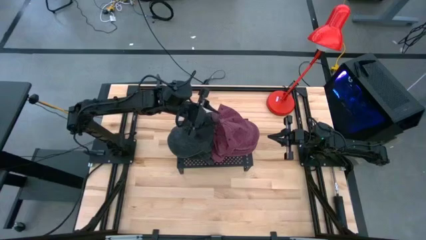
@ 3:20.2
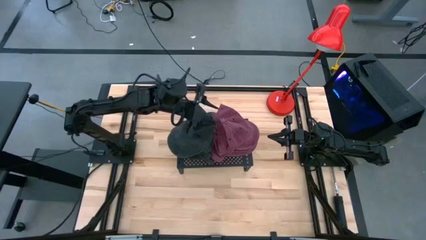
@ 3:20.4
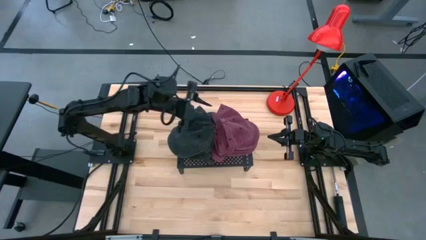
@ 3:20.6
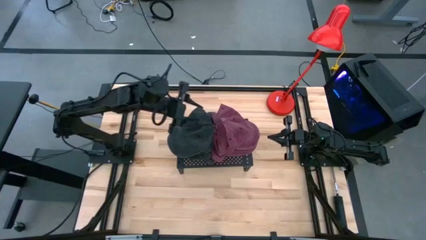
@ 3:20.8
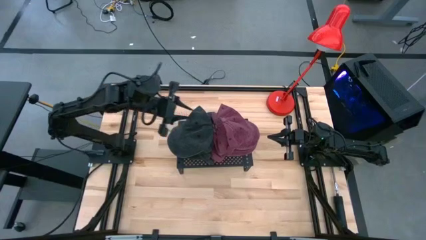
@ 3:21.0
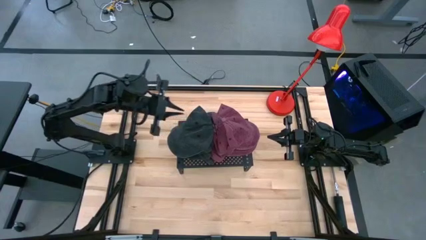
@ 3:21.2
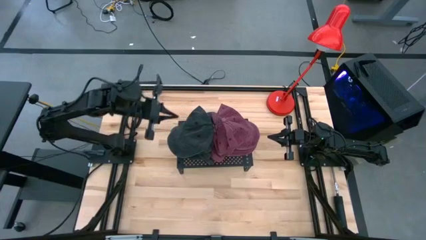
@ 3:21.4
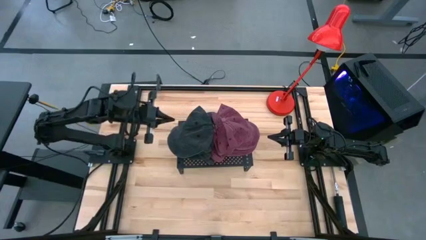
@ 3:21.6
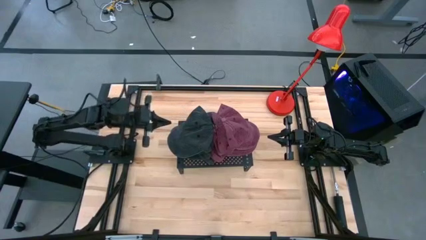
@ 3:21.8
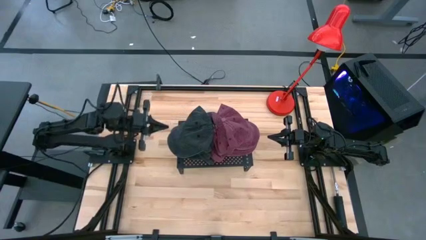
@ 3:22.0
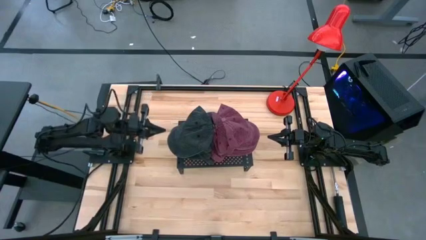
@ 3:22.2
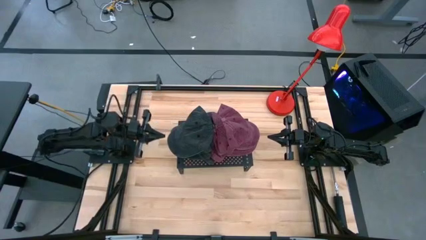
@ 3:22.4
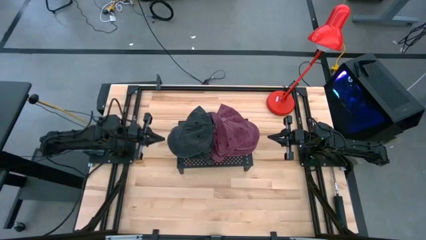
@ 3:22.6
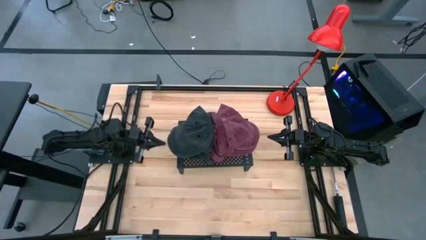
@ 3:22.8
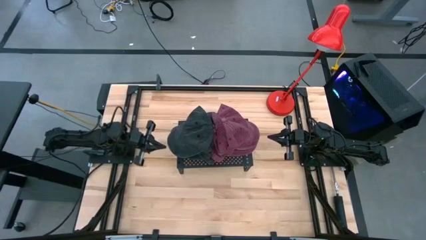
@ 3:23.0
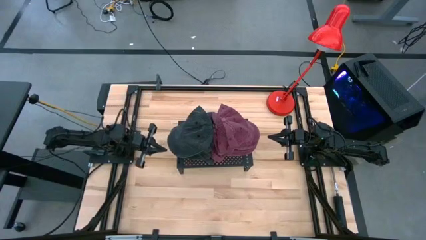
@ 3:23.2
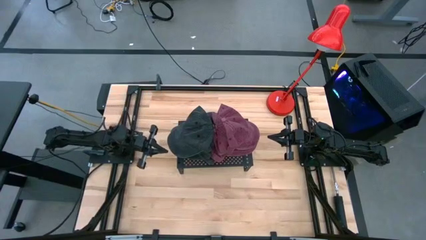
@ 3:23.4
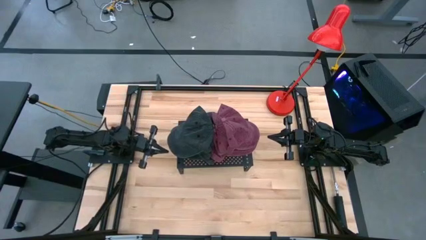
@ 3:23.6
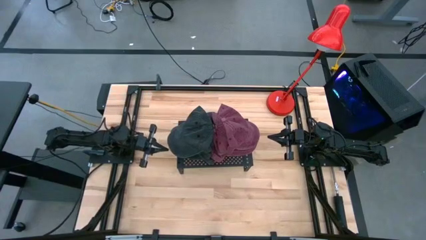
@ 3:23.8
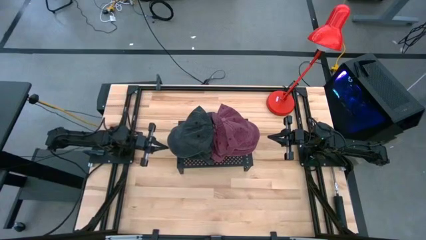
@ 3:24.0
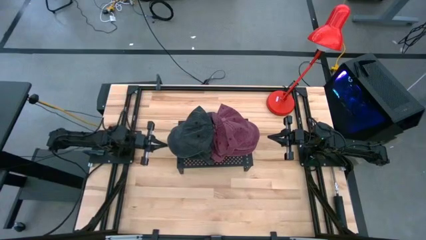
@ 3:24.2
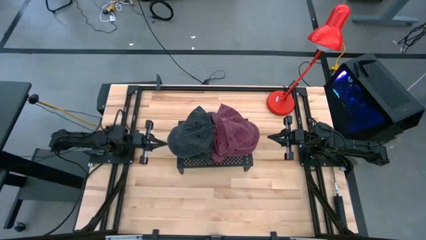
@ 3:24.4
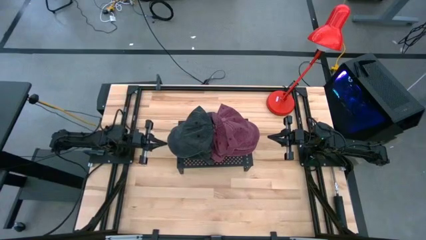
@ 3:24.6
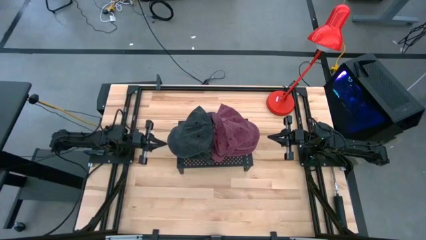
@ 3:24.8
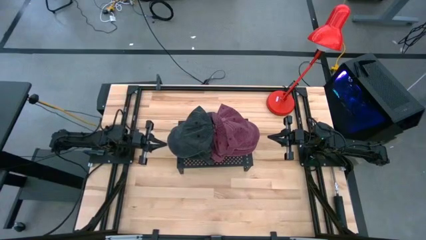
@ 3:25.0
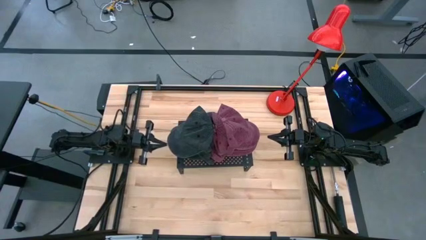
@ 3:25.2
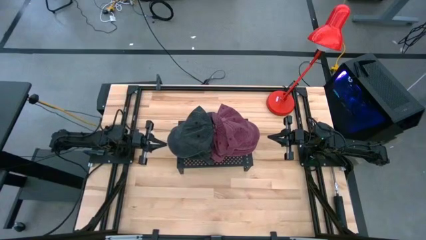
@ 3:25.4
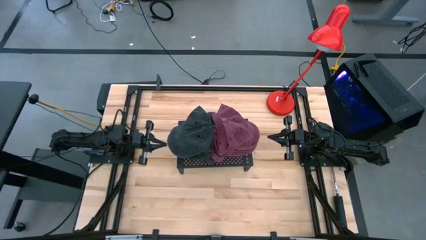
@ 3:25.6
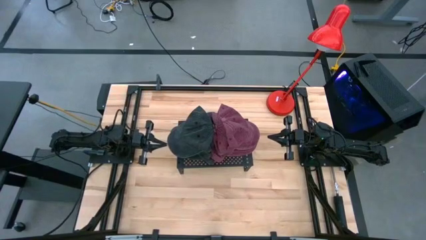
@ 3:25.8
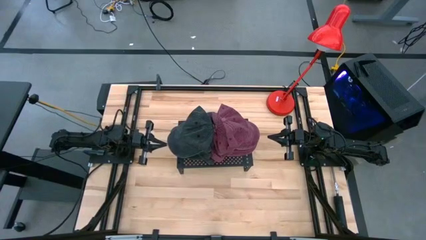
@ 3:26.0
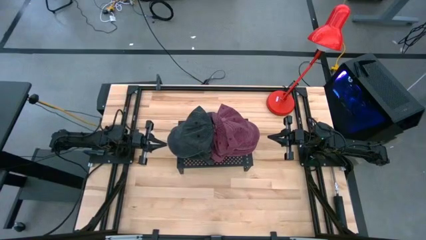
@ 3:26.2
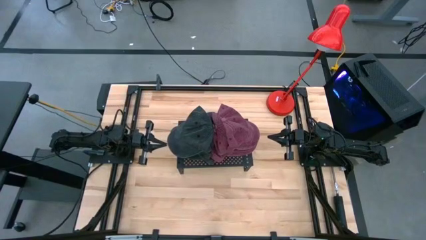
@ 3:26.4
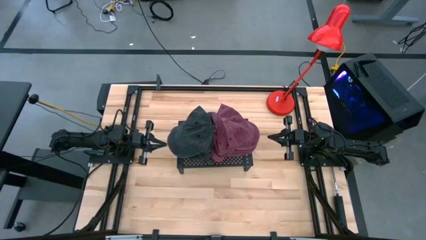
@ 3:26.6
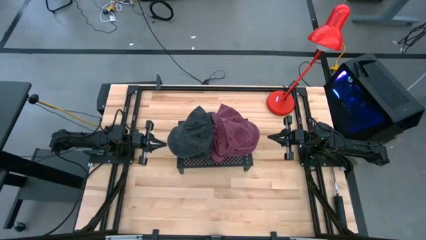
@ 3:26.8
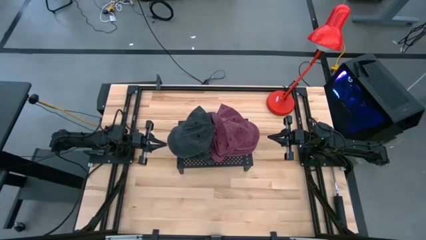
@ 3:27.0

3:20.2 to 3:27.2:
Task: Pick & Place hat
Return to Home Position

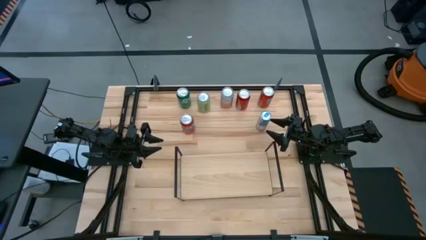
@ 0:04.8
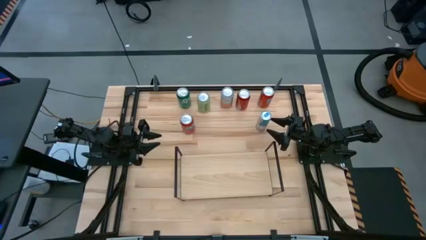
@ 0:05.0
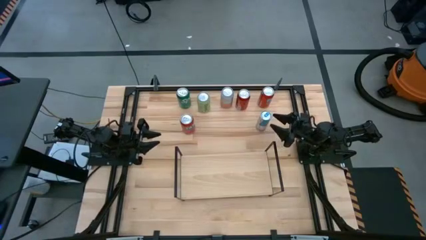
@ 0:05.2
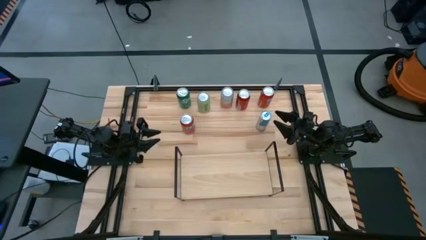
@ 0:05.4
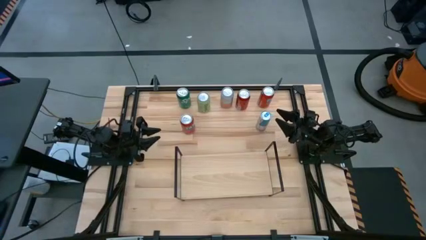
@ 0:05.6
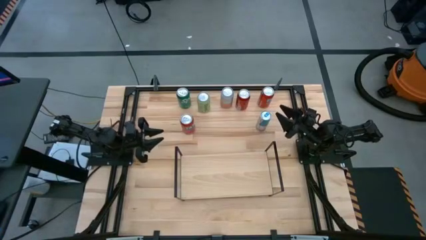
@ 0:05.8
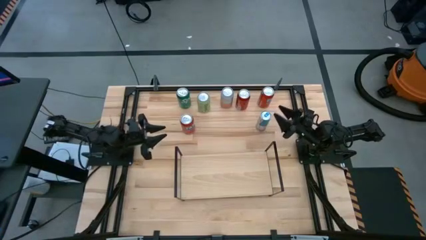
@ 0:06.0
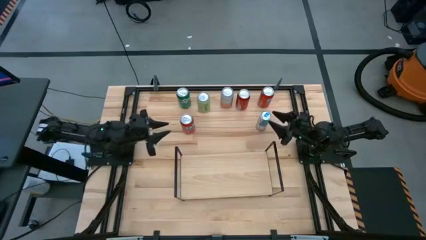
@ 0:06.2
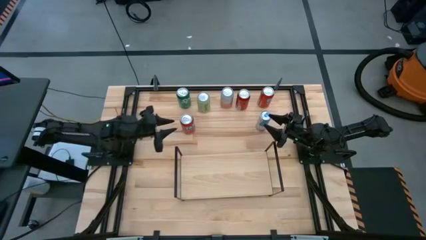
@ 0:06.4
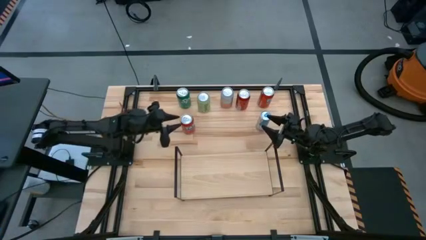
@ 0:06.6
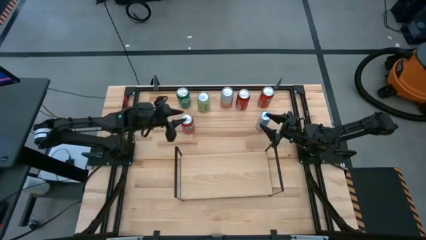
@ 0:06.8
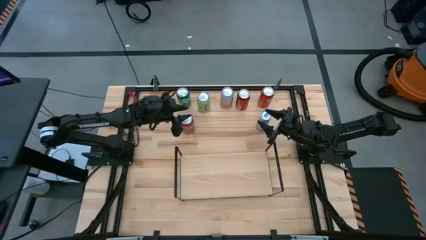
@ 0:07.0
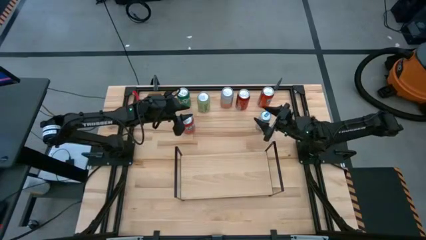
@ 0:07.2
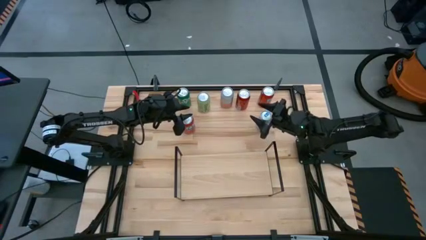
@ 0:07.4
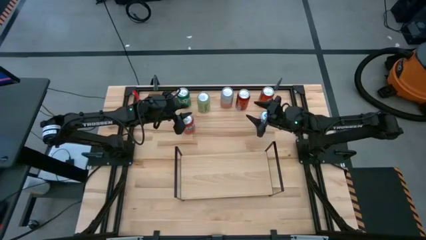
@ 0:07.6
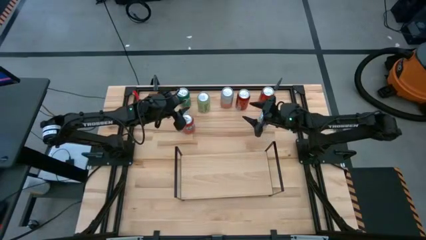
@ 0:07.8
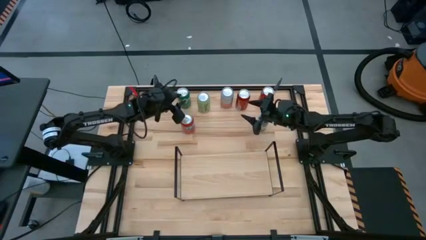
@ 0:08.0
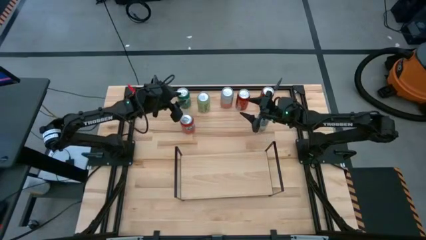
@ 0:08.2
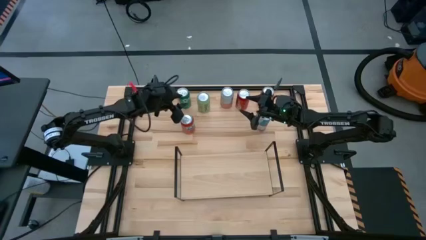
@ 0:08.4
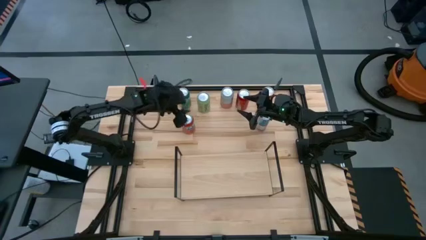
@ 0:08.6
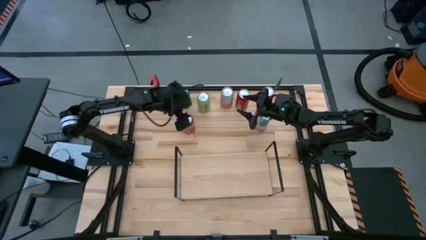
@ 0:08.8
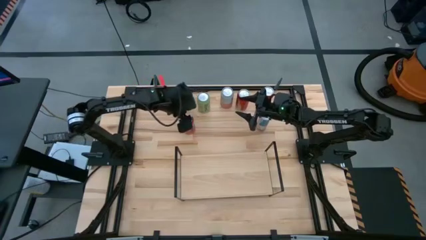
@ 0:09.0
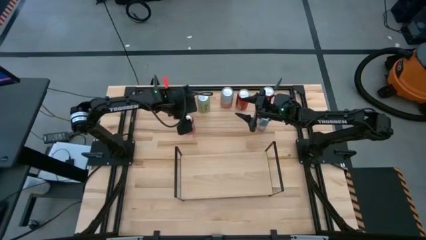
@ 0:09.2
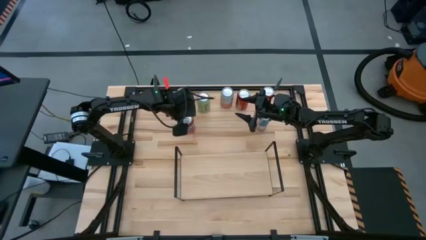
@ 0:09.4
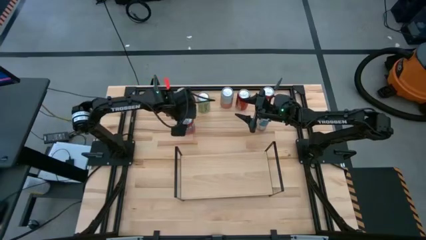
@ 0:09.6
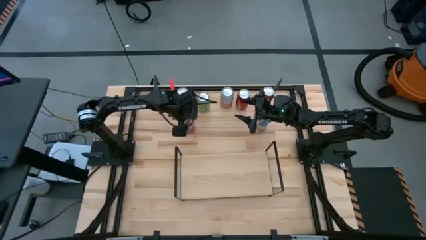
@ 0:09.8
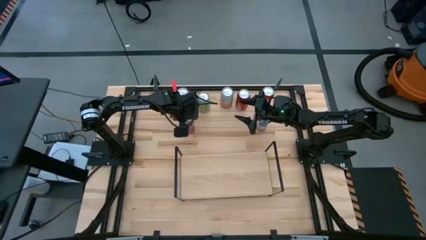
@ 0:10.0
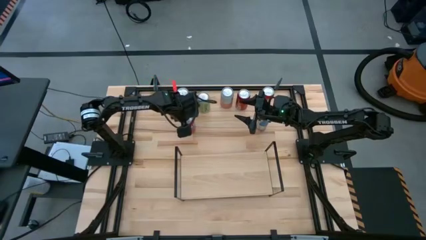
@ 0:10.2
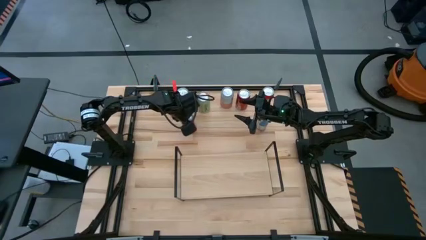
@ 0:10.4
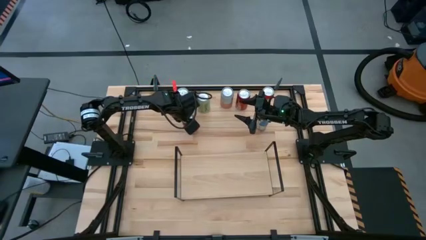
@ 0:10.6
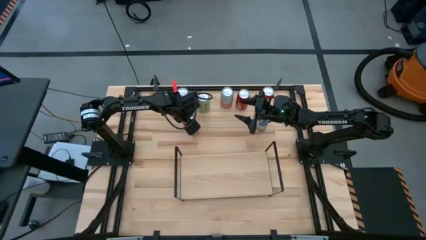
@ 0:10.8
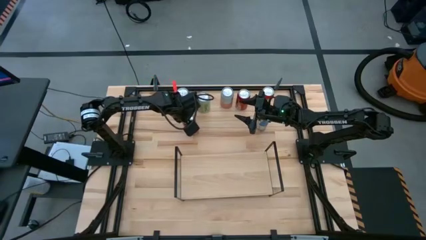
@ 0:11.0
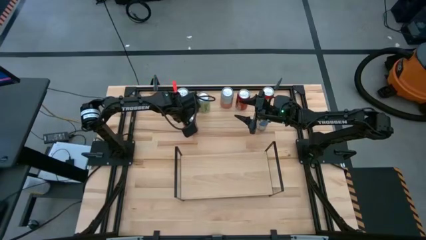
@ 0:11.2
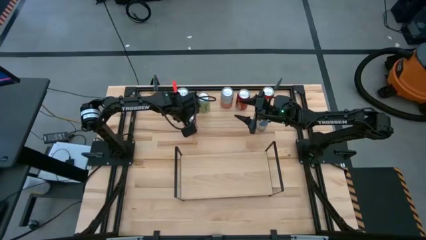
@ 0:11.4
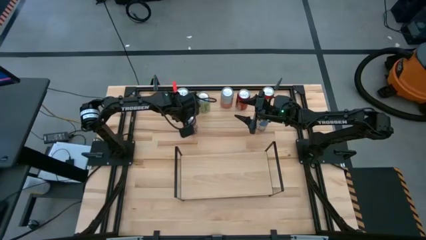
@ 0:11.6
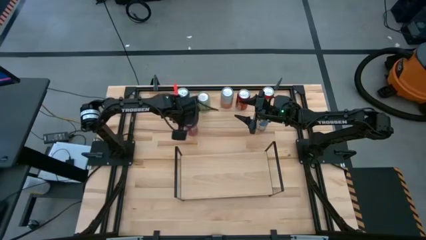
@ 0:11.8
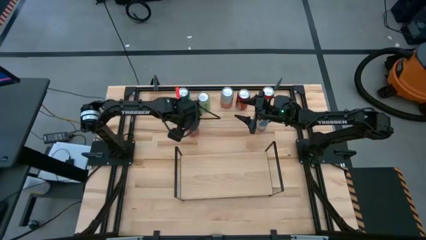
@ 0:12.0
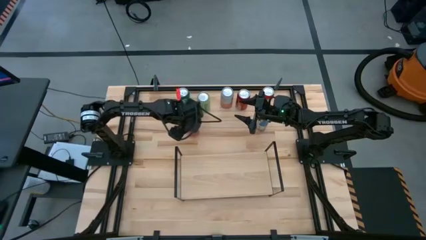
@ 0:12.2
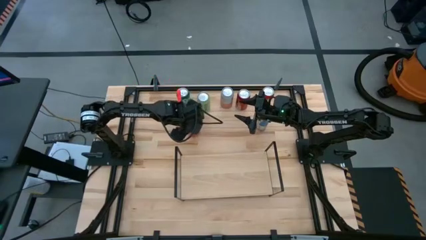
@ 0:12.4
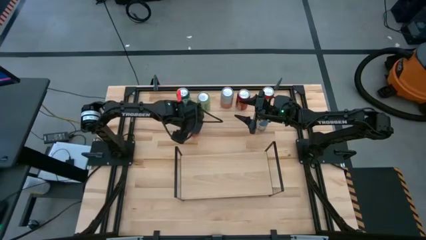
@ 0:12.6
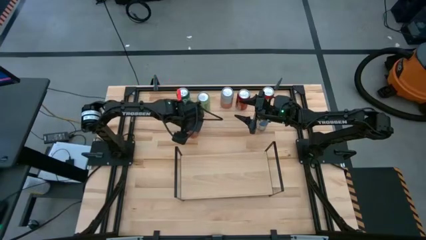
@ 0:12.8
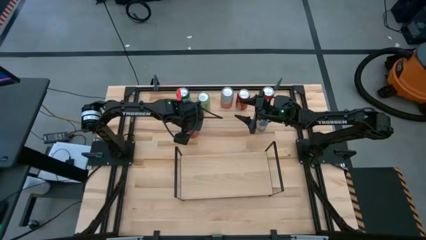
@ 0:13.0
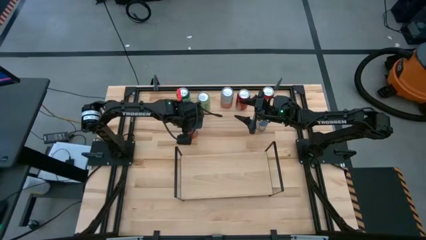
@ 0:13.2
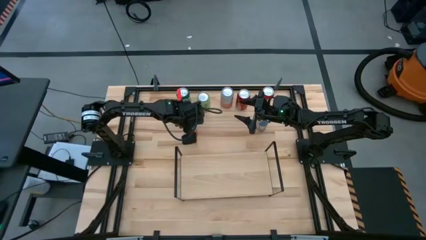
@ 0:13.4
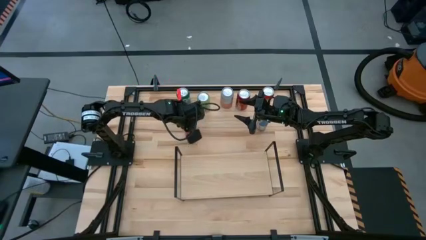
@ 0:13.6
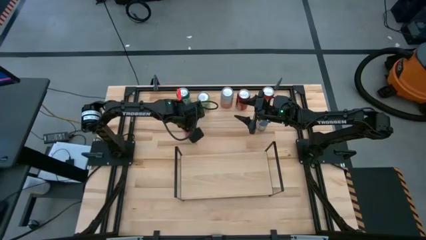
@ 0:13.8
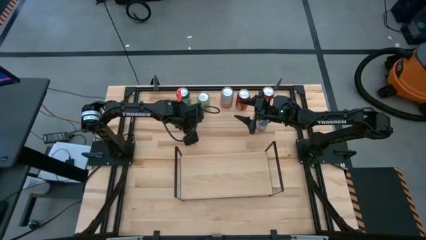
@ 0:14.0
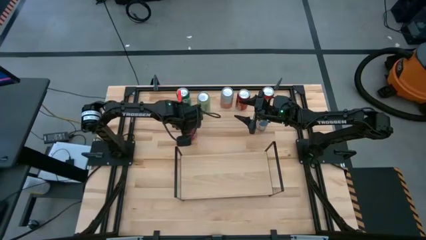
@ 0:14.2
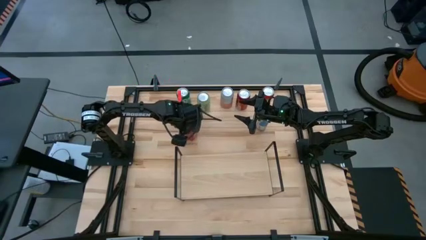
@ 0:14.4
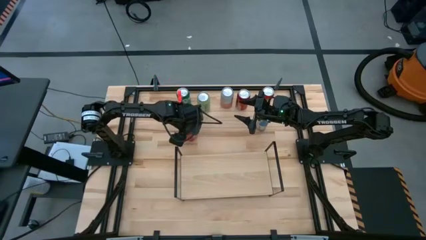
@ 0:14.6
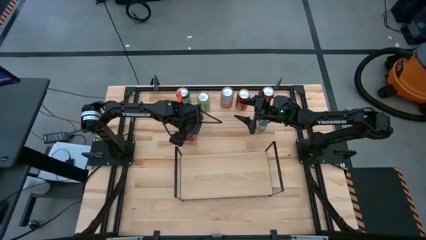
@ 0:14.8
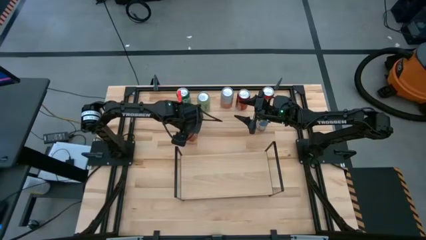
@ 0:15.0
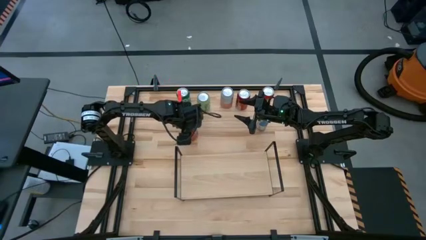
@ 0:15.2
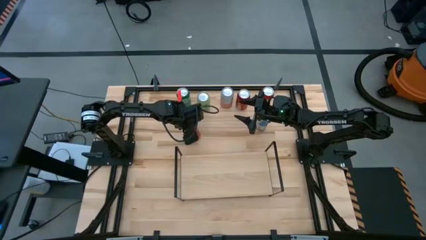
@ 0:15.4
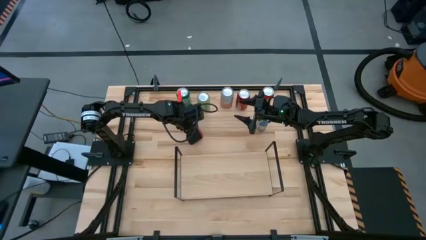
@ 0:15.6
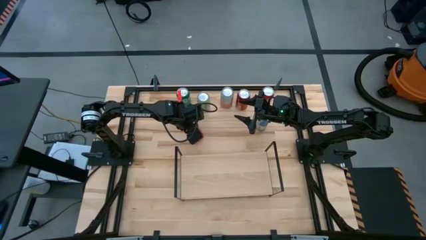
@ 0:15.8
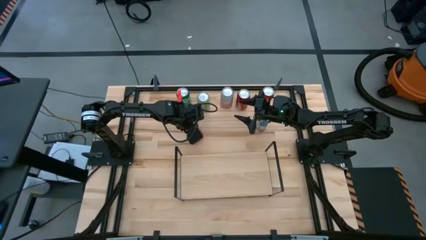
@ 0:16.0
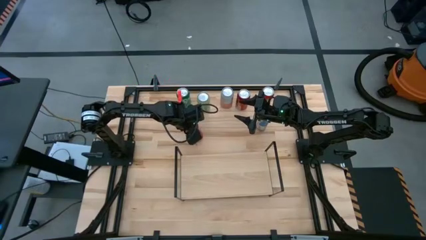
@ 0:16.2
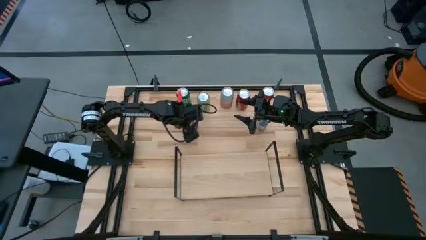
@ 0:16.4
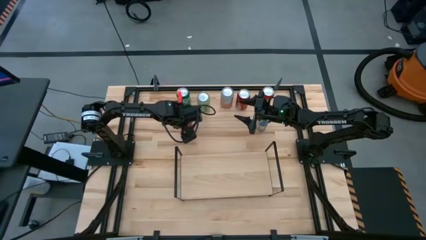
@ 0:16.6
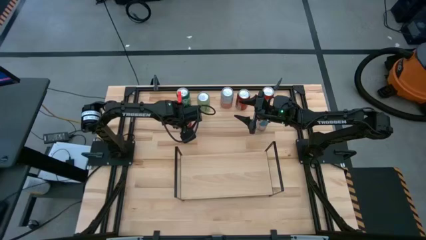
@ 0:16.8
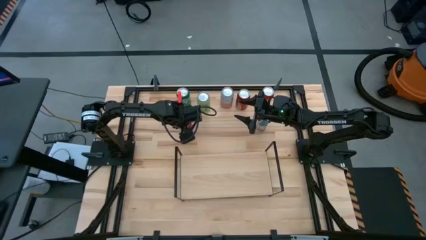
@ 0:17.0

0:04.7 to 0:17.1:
Task: Place canned beverage on shelf
Put the bottom orange soda can on the shelf
